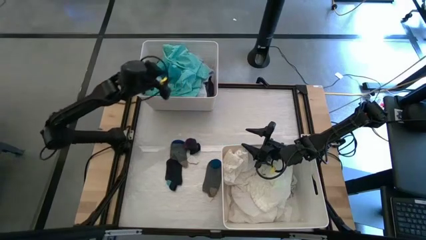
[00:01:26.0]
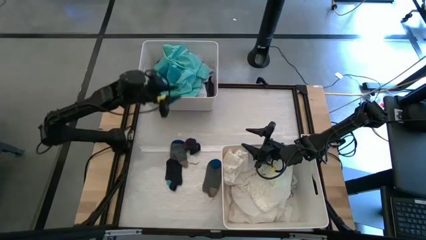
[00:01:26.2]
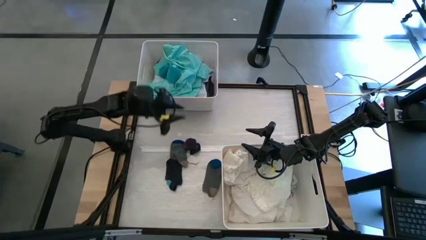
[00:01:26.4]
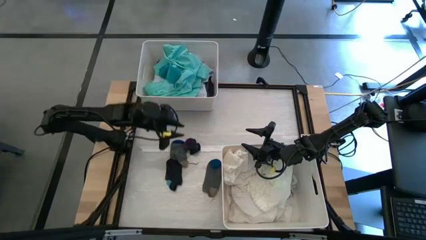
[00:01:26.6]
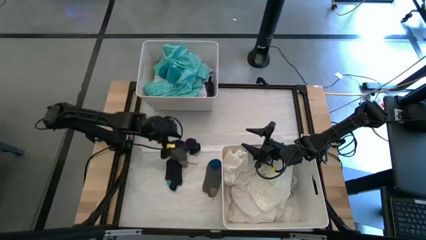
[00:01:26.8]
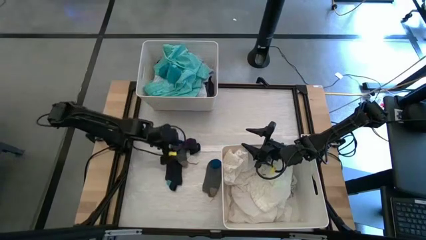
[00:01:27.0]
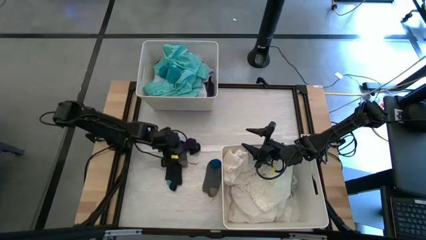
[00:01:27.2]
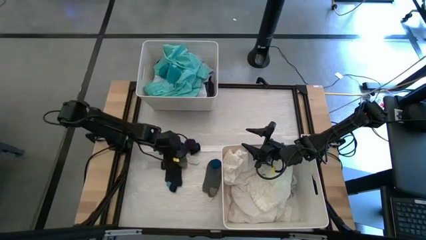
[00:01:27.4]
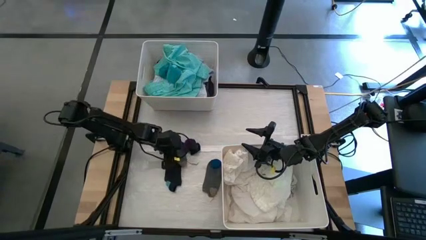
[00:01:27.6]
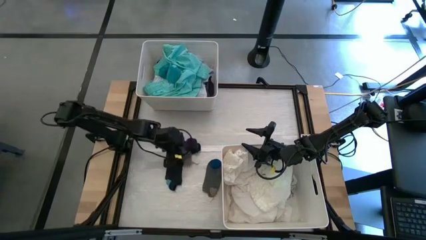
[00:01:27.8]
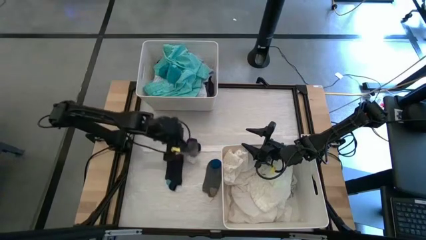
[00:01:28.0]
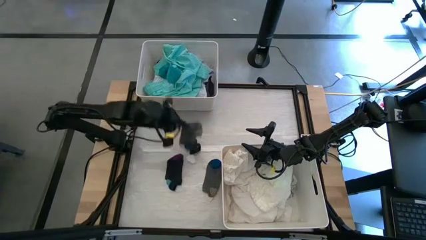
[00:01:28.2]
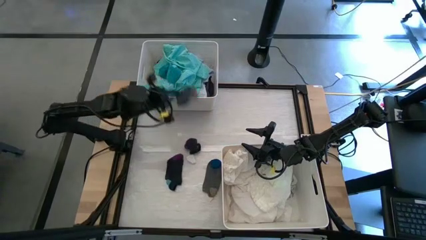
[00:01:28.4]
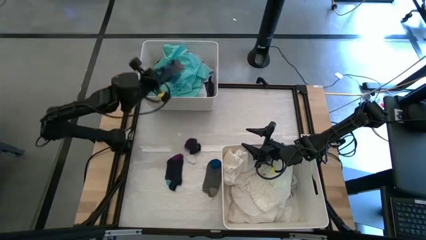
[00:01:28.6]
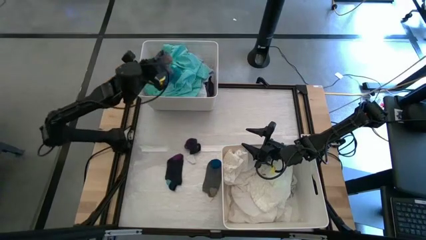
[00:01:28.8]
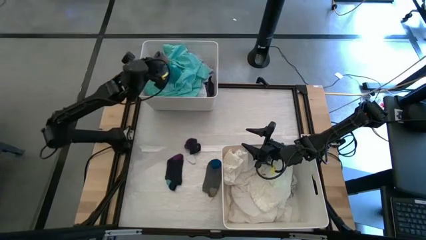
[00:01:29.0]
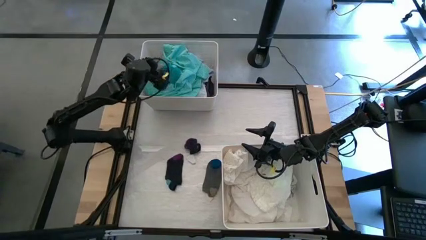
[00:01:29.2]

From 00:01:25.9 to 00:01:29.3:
Task: Sort clothes
Put the grey sock into the top white laundry organizer

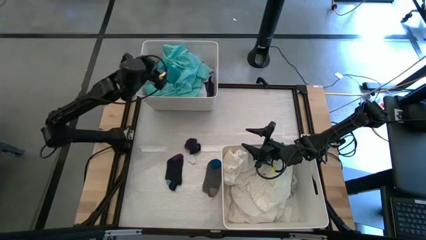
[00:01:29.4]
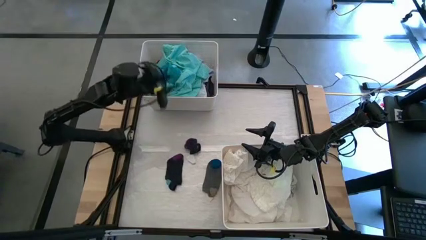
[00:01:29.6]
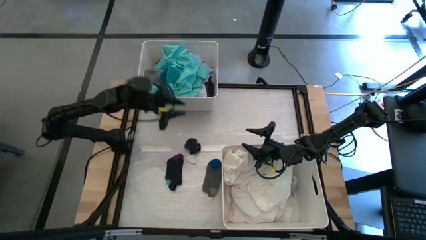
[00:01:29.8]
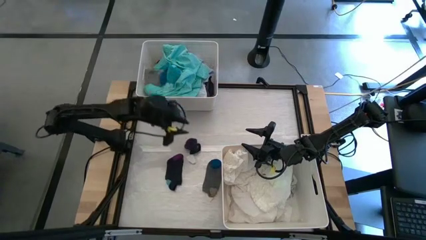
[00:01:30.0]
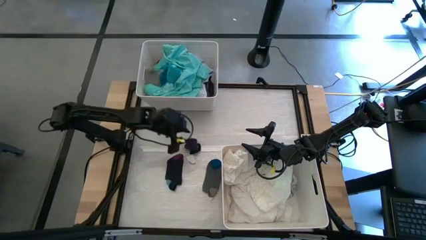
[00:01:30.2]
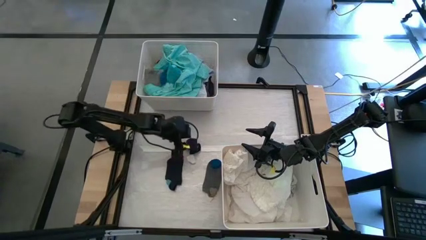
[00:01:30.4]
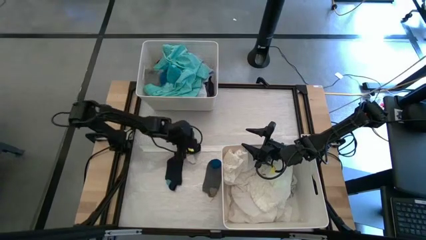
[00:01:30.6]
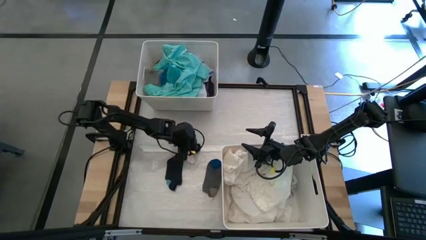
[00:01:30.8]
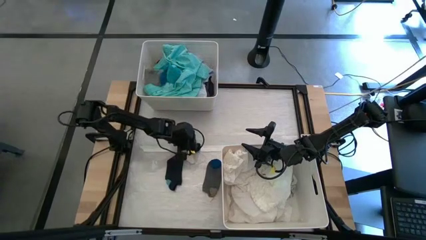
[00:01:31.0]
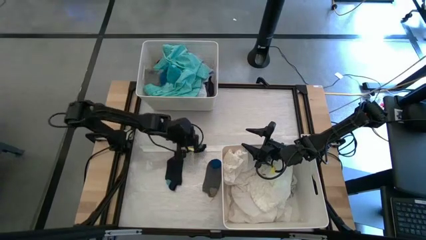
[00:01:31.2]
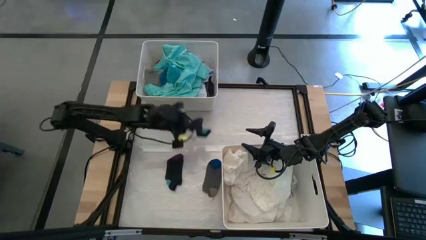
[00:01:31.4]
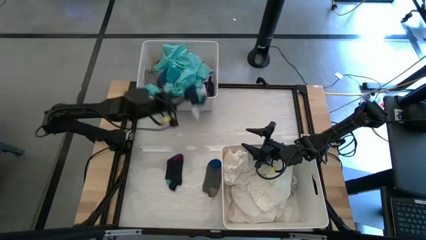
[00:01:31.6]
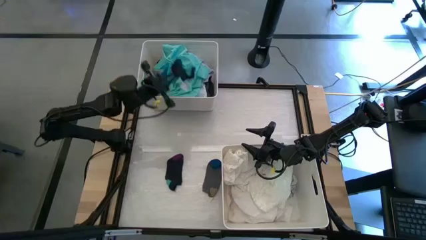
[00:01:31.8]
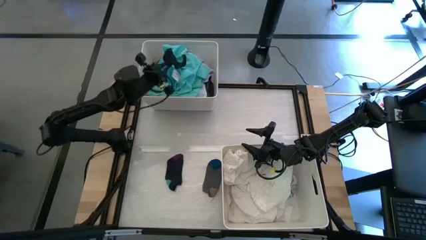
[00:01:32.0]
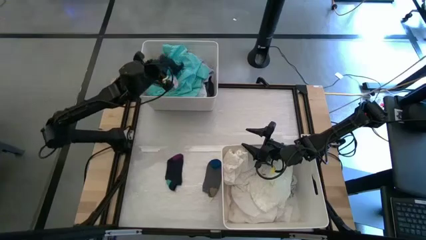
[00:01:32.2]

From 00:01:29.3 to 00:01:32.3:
Put the black sock into the top white laundry organizer

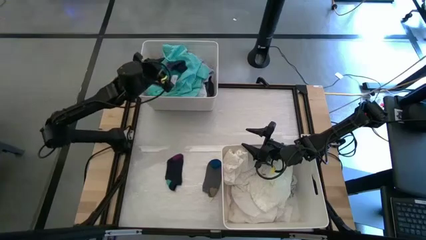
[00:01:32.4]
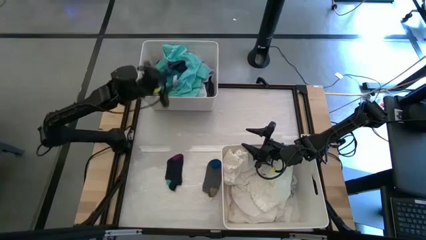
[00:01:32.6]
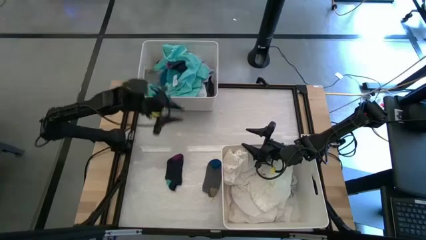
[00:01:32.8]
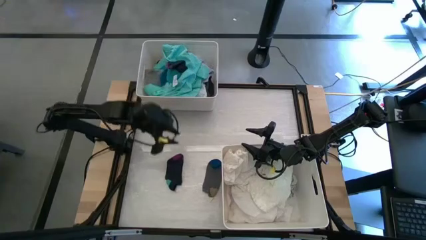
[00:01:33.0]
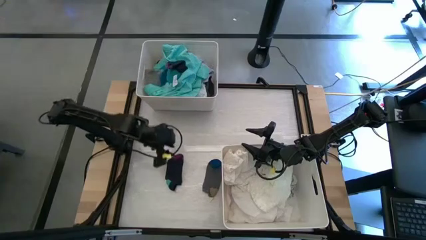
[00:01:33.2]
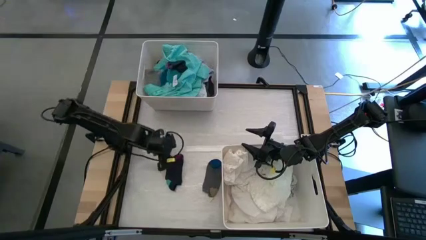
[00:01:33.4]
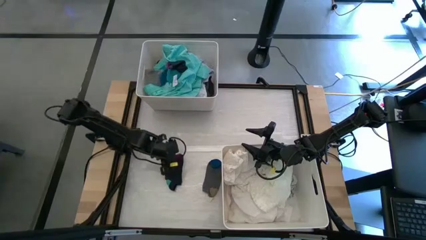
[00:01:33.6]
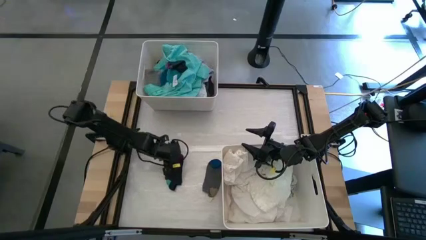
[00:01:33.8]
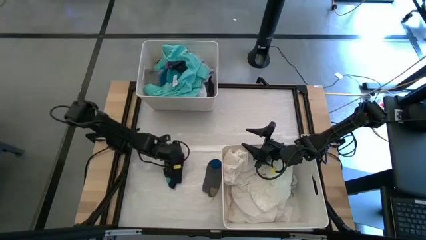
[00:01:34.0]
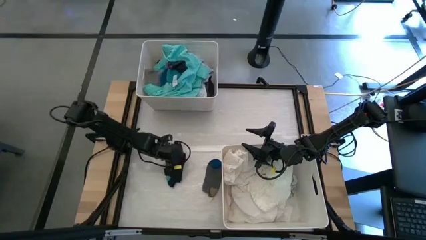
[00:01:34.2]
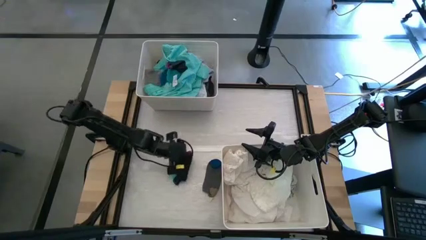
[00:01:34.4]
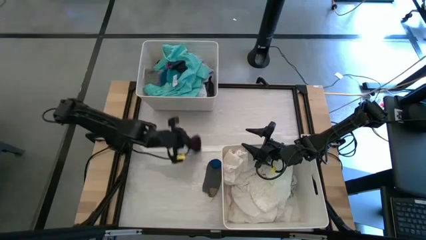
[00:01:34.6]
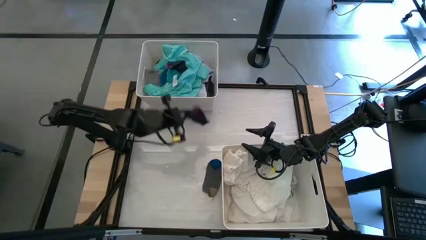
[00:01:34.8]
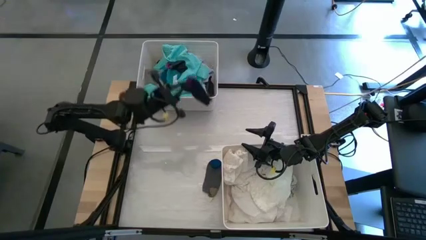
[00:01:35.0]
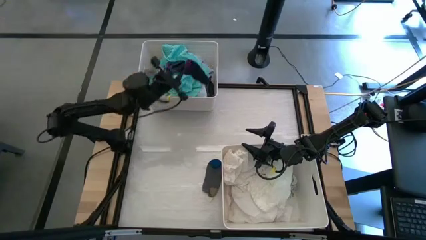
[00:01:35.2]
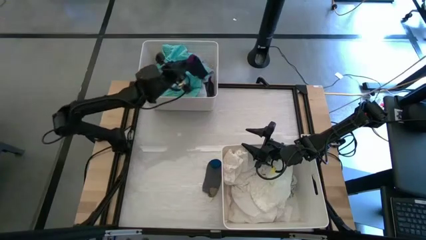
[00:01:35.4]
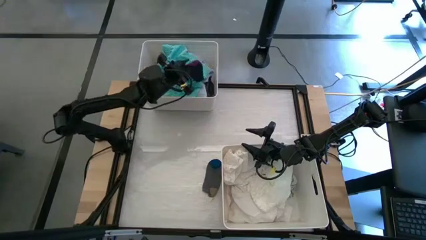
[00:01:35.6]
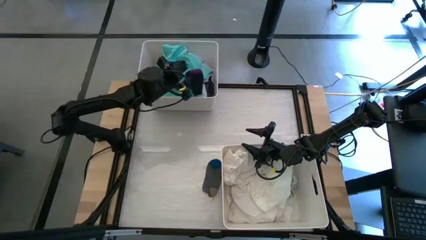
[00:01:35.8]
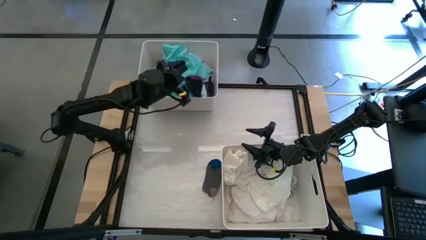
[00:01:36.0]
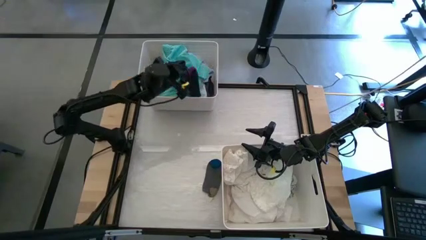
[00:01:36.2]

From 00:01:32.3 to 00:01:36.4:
Put the black sock into the top white laundry organizer

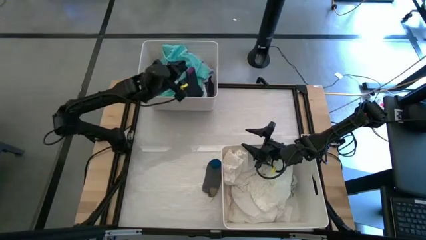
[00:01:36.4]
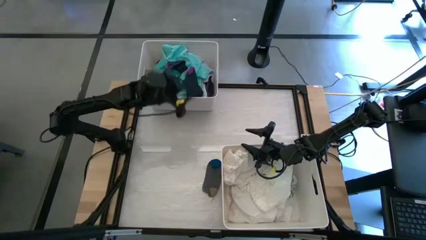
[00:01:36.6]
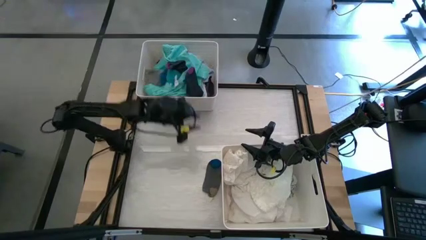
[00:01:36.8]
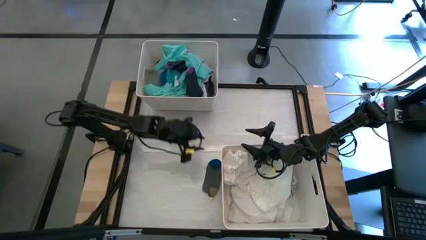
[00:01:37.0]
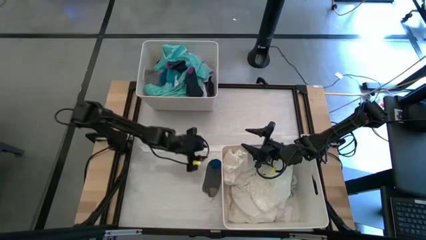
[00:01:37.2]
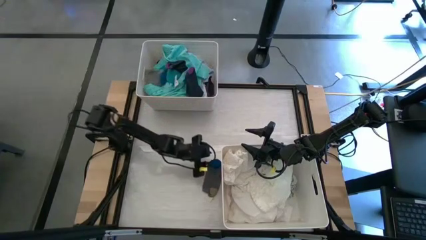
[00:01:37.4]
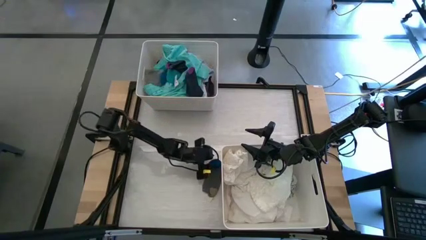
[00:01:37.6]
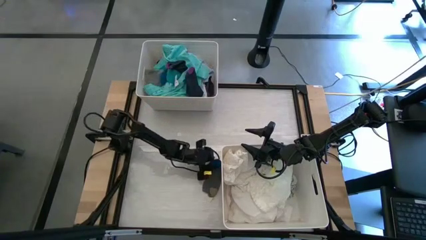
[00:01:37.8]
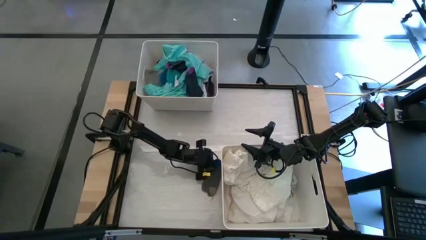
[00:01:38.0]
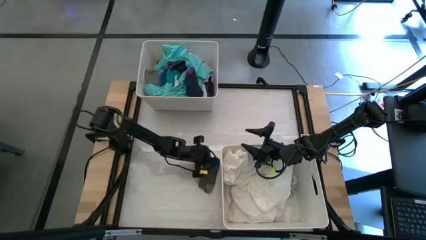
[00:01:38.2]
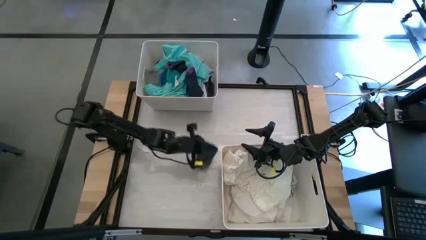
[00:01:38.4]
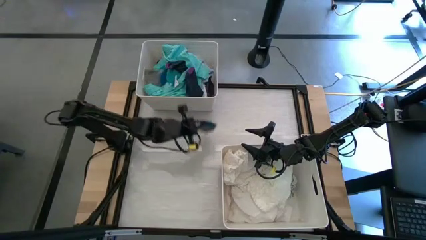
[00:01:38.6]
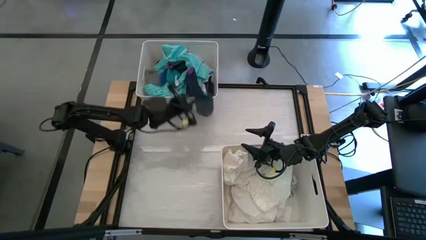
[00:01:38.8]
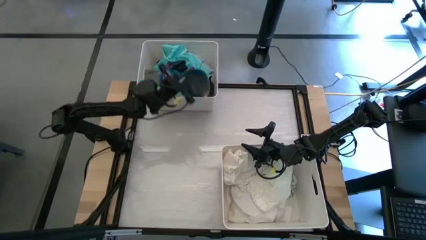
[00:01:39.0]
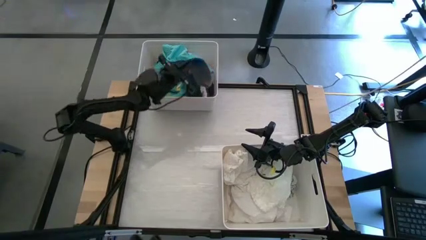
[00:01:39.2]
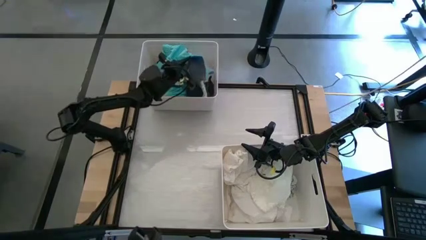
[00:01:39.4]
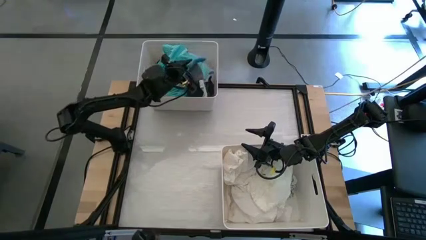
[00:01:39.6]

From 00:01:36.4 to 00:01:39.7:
Put the grey sock into the top white laundry organizer

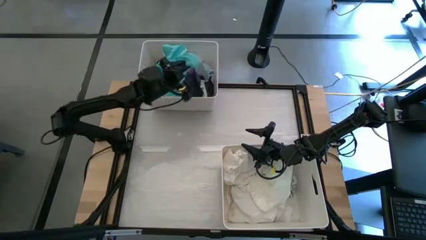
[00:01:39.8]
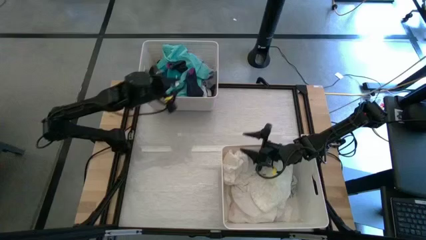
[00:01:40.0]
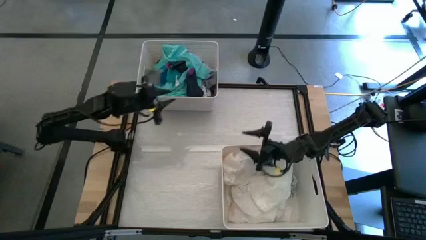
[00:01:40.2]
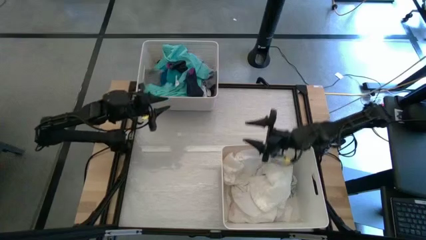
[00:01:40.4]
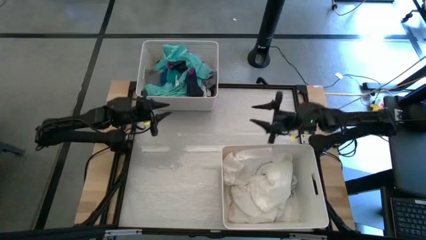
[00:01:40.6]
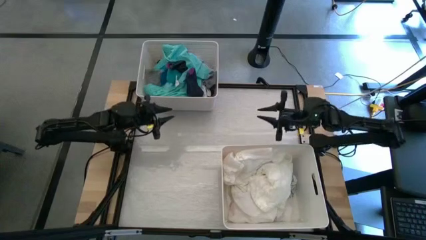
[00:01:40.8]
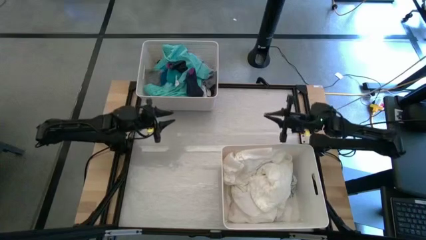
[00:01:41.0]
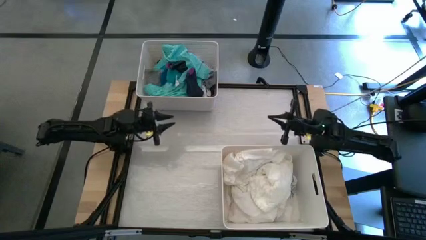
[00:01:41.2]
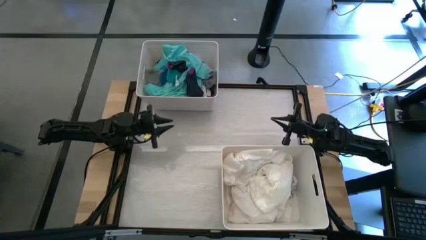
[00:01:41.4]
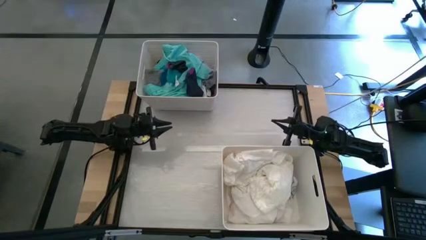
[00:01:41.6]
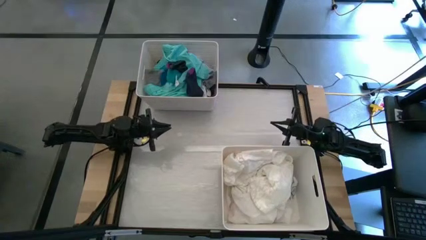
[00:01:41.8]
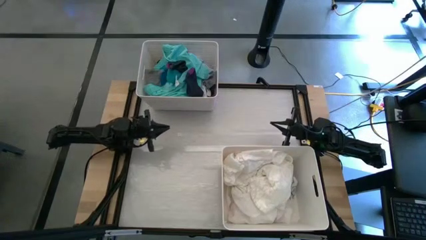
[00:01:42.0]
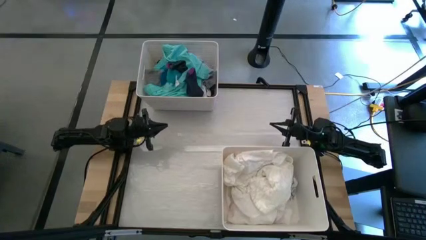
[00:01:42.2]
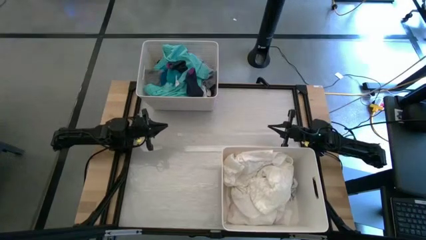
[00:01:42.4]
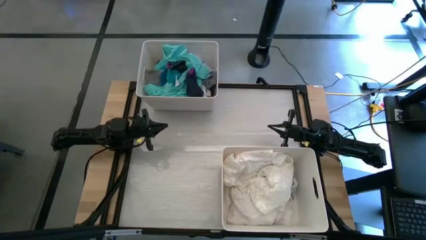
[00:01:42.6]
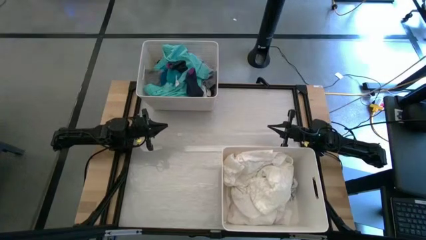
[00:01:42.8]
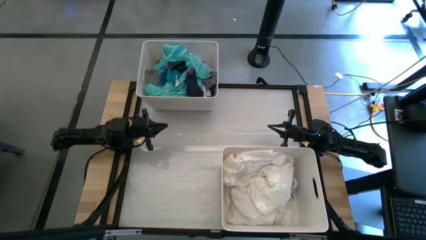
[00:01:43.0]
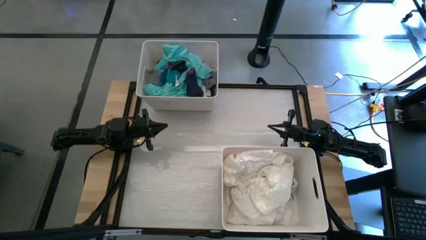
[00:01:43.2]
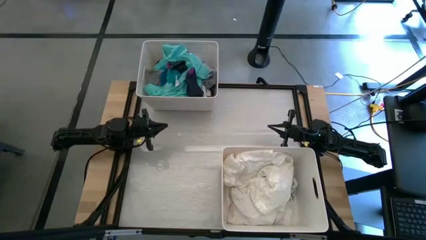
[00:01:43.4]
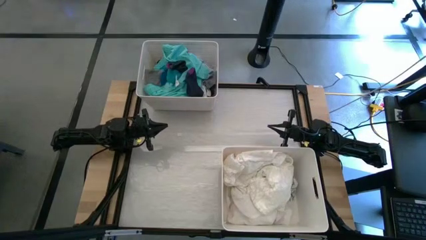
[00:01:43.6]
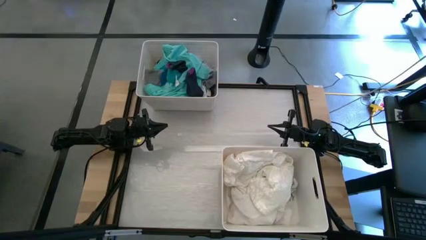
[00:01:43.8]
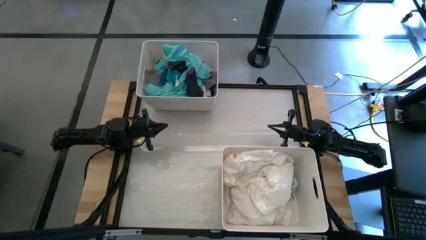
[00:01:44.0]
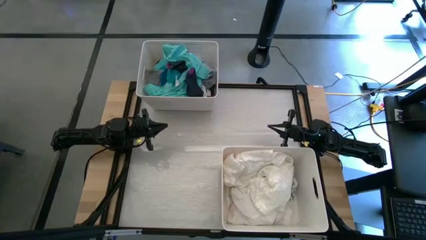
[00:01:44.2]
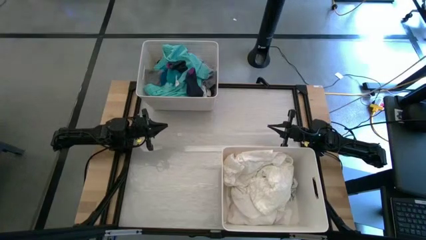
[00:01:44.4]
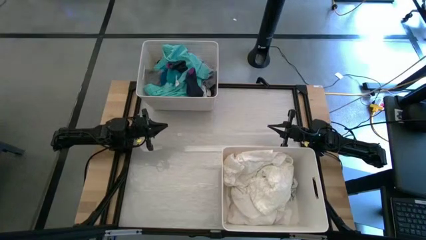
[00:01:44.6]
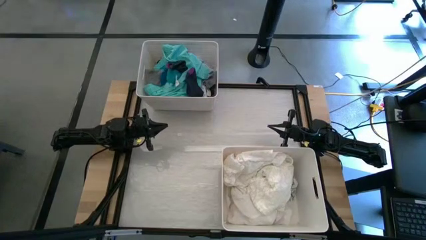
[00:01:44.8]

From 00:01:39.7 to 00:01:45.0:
Return to Home Position
